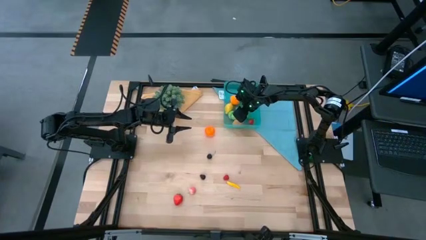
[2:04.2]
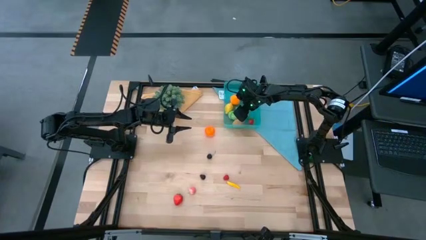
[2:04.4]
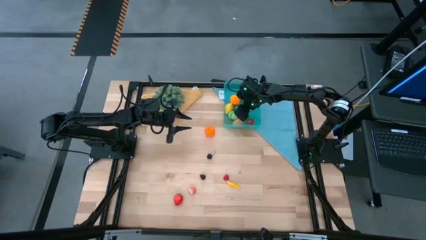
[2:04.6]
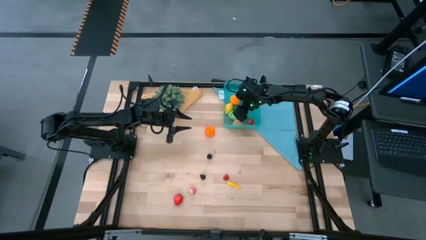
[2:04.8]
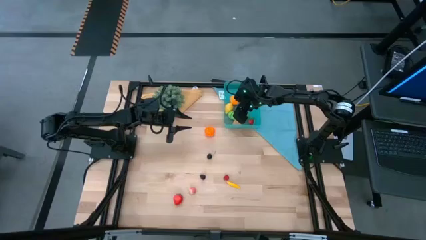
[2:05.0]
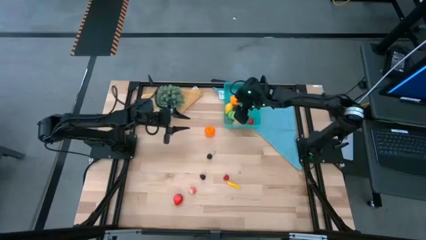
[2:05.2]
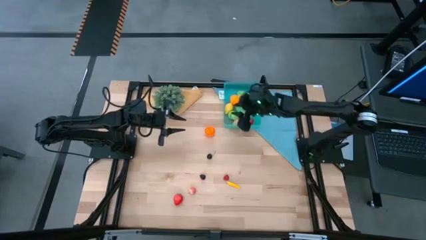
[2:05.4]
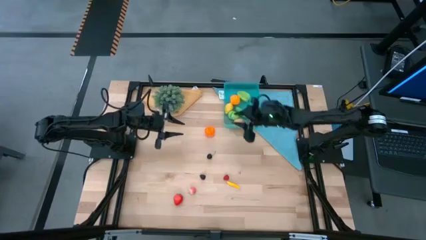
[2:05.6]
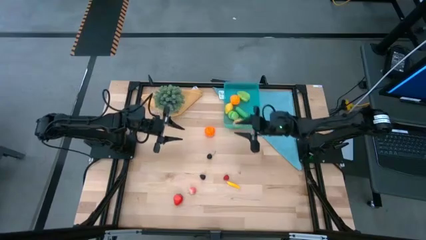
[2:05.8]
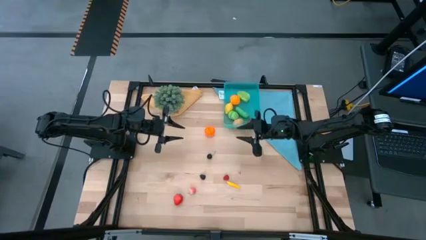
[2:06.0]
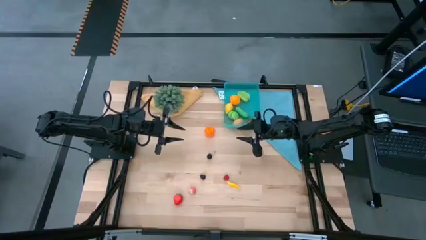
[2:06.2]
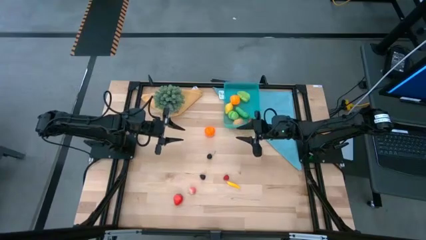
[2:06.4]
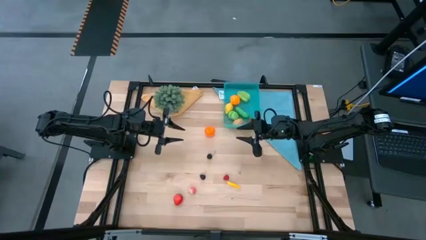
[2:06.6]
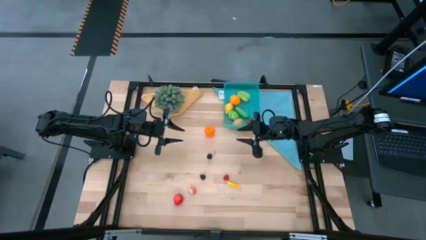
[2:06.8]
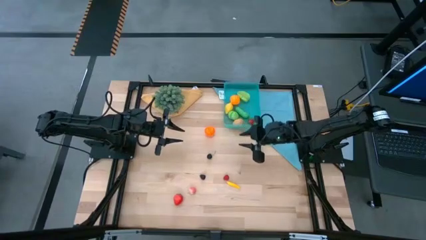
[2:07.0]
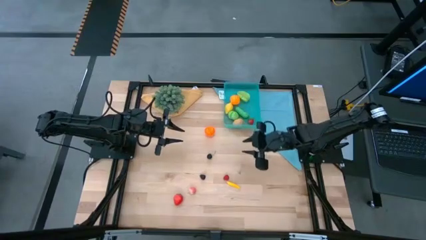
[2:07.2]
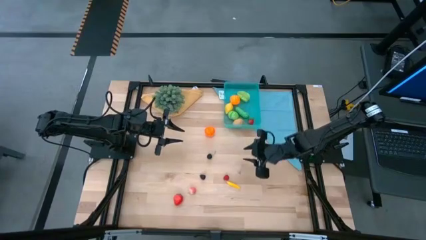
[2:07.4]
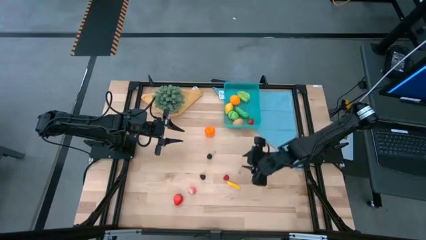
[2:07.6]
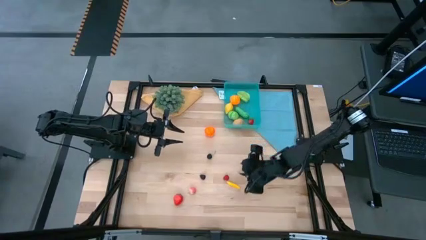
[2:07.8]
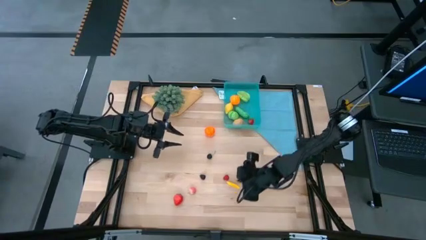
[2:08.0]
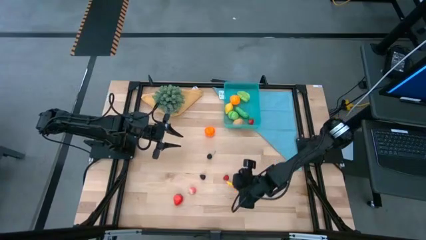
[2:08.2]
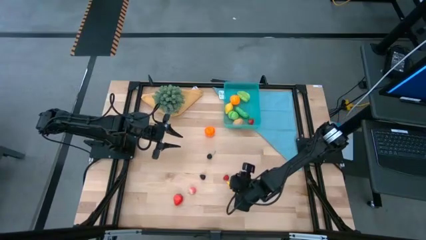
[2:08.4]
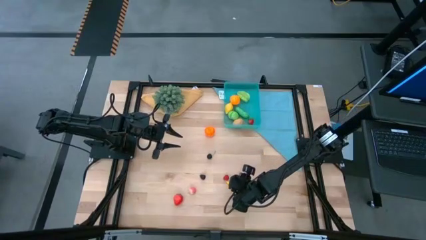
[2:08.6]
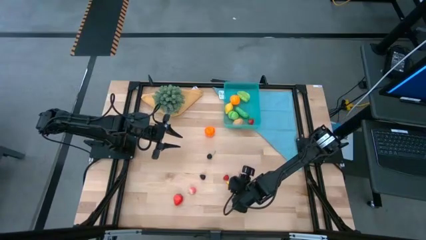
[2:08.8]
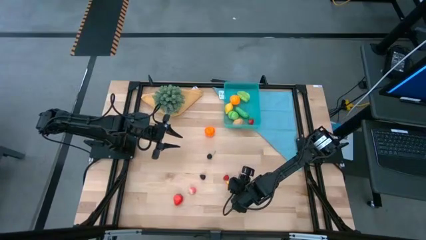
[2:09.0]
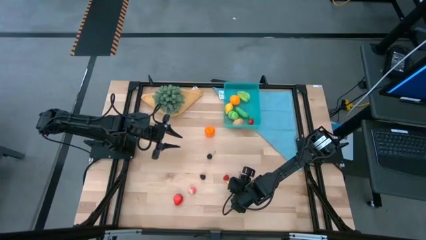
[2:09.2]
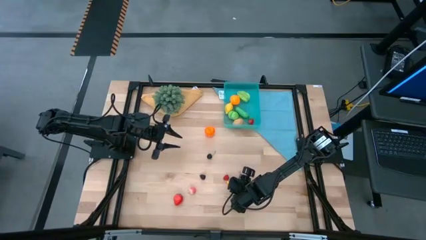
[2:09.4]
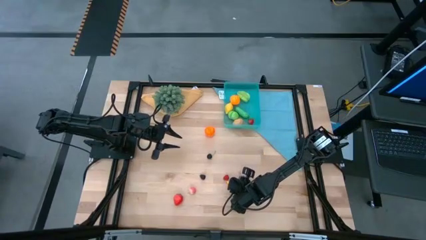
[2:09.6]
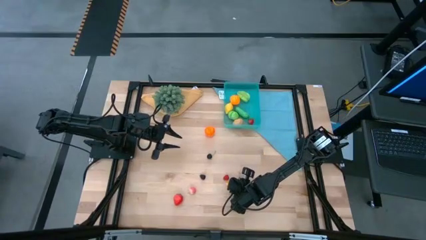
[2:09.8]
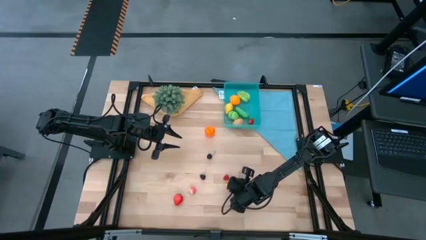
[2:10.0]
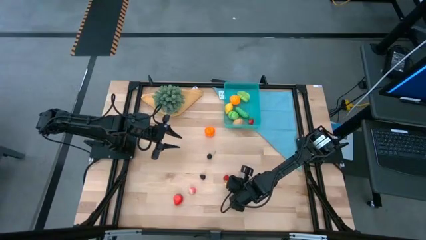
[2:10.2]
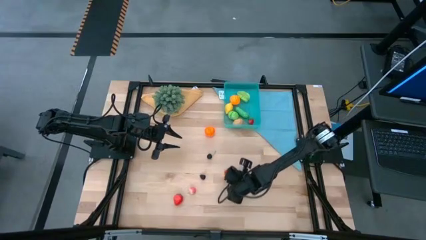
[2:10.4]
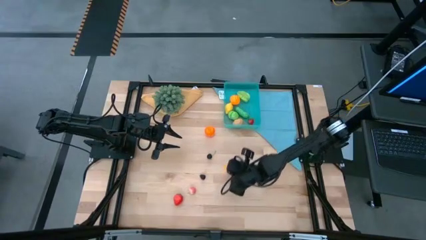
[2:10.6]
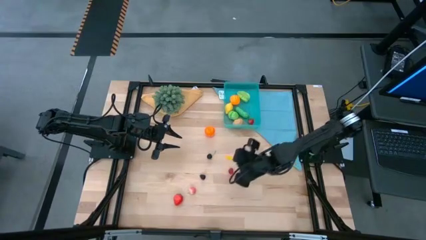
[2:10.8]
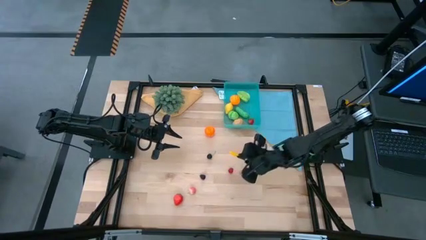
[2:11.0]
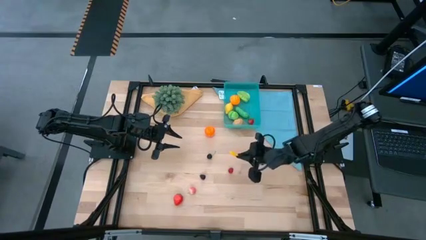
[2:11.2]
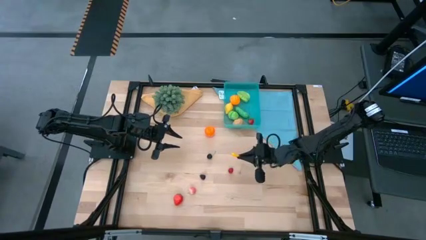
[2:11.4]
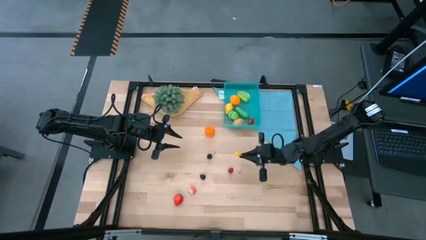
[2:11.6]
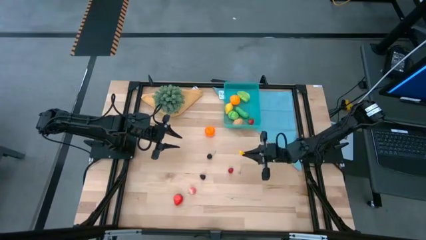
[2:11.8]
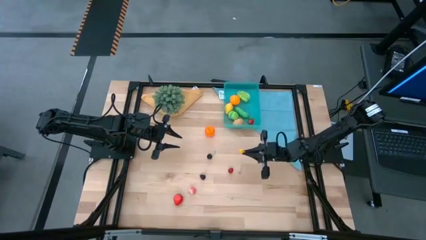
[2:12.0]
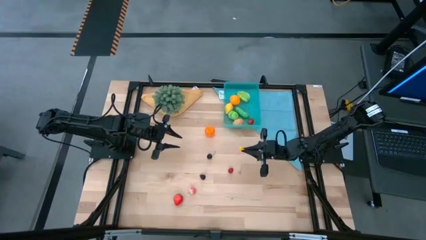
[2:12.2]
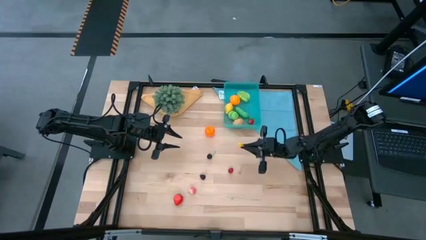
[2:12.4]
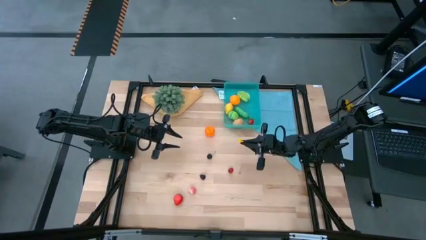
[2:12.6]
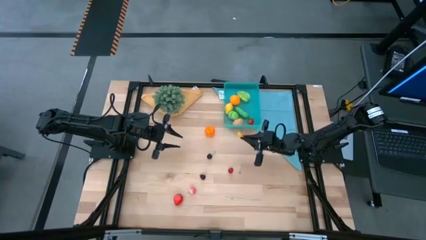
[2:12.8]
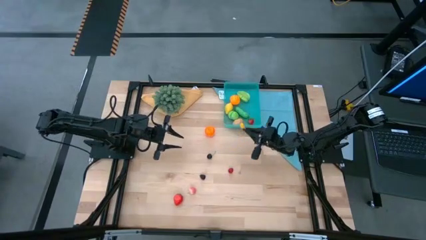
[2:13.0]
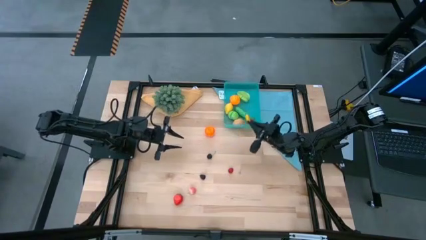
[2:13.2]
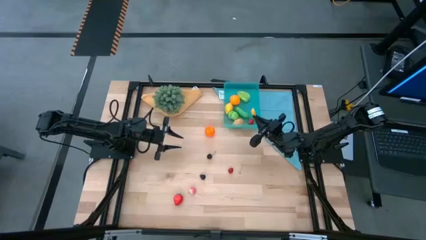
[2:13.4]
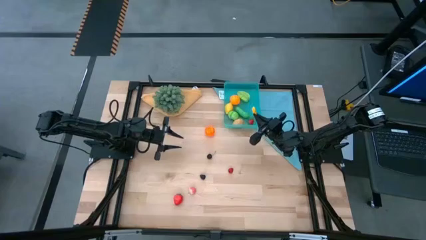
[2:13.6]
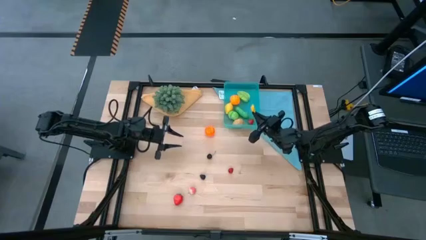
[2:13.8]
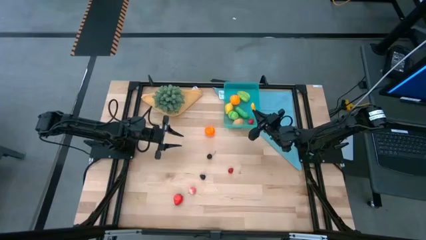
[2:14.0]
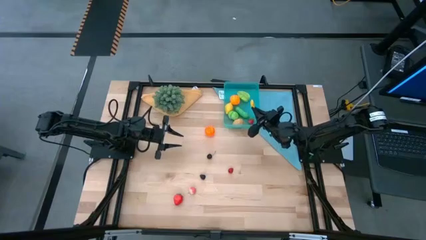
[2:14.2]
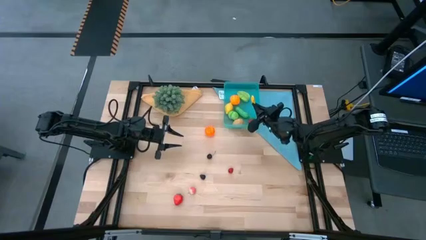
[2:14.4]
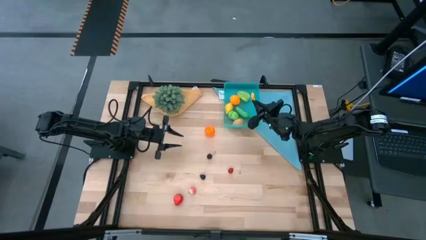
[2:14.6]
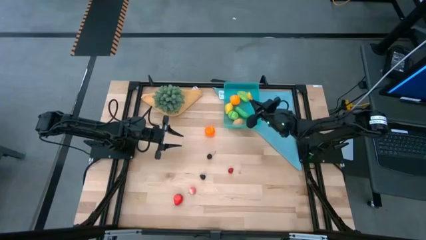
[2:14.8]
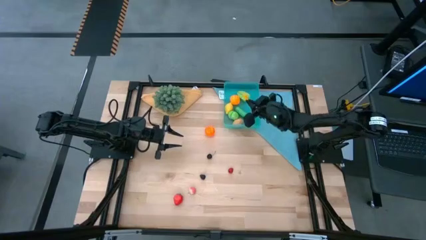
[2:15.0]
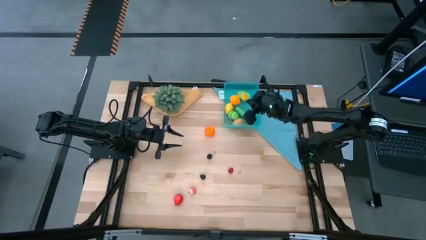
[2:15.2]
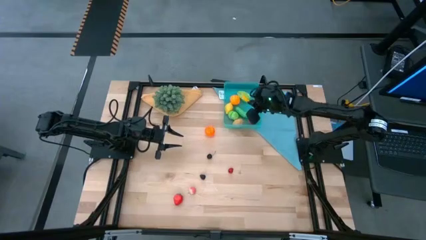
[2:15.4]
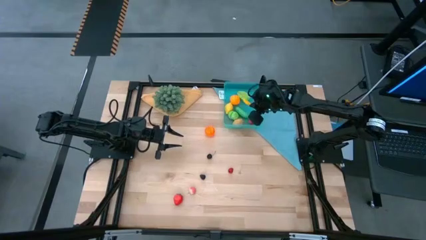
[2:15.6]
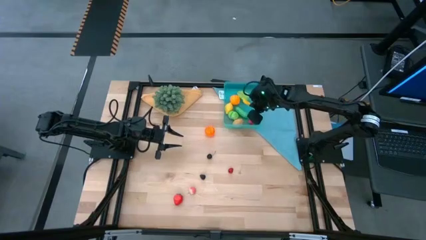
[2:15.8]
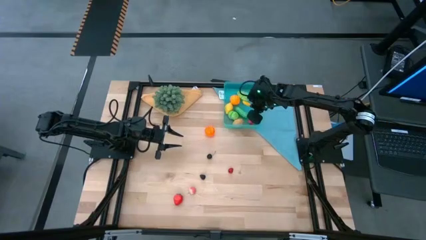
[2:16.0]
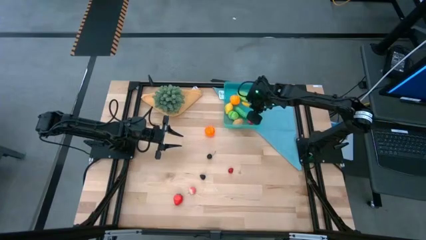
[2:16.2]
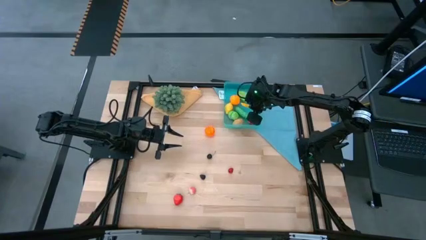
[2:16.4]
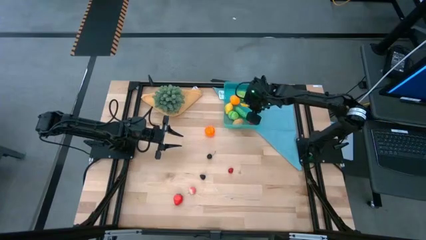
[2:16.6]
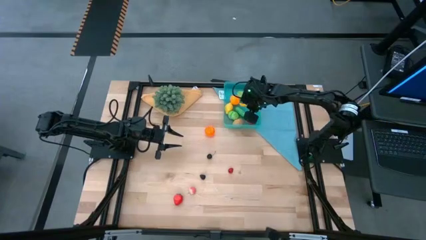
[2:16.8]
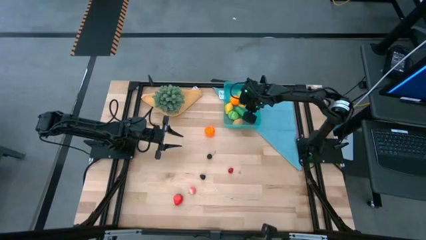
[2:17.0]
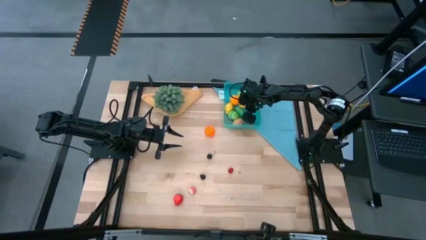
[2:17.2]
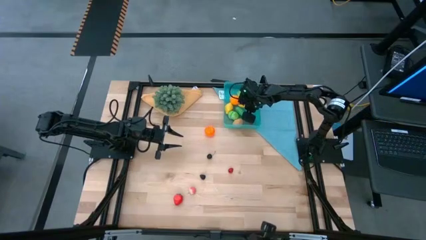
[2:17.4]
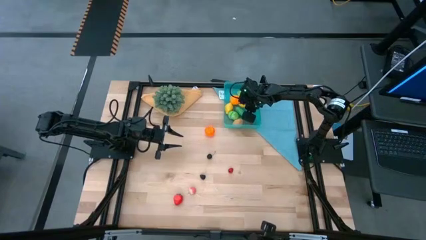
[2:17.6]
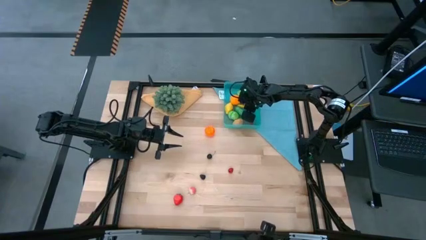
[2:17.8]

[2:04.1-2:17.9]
Task: Pick and placing Produce into tupperware
Put the yellow corn into the blue bin

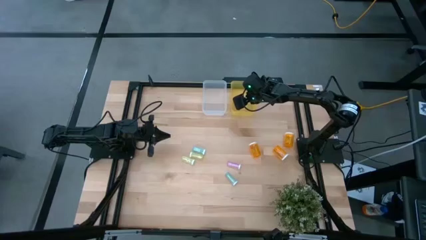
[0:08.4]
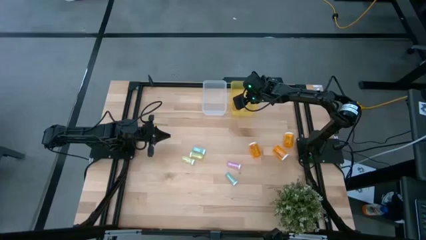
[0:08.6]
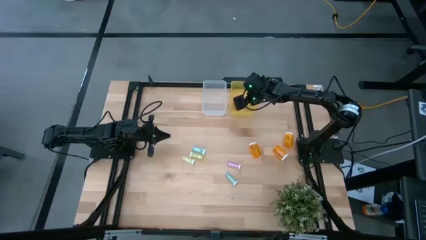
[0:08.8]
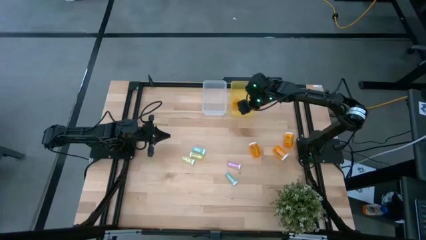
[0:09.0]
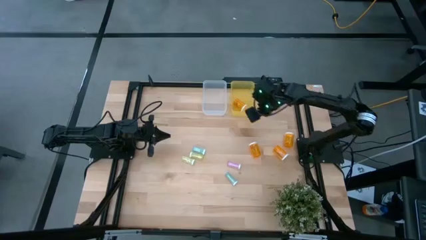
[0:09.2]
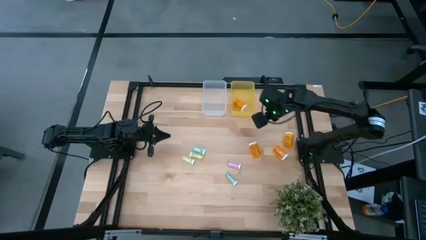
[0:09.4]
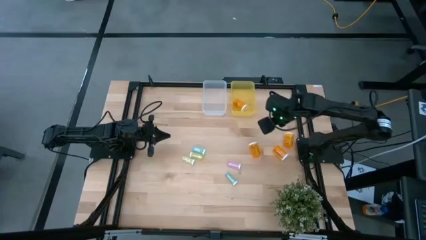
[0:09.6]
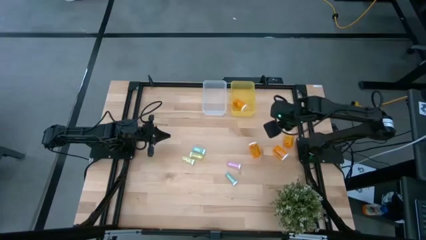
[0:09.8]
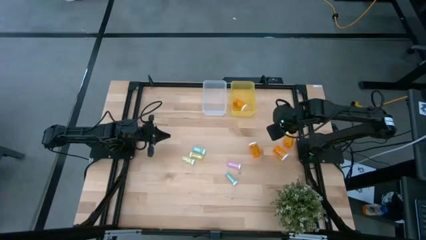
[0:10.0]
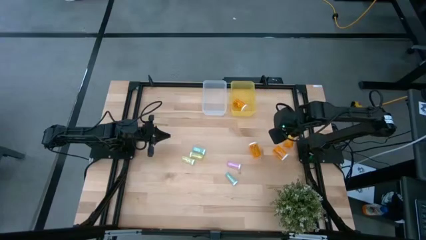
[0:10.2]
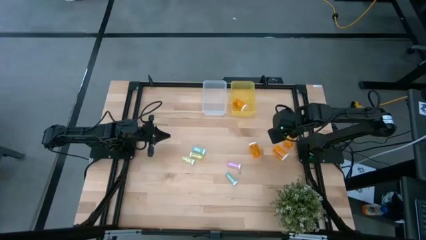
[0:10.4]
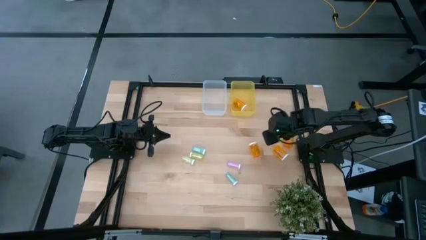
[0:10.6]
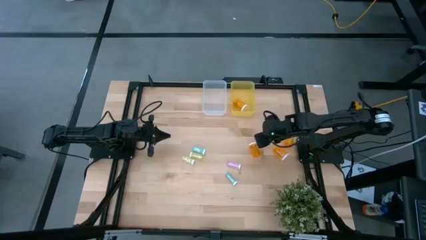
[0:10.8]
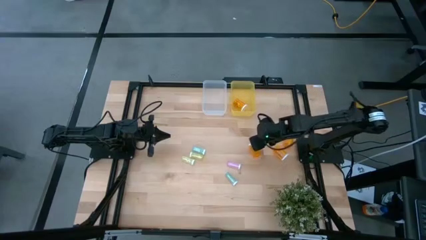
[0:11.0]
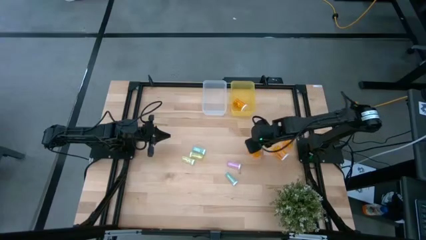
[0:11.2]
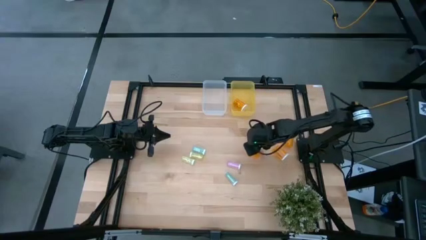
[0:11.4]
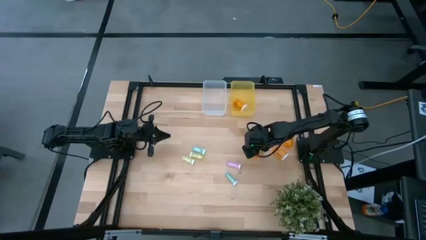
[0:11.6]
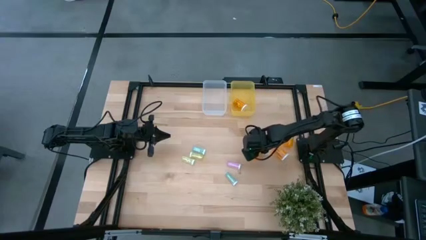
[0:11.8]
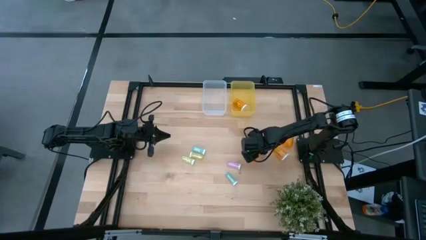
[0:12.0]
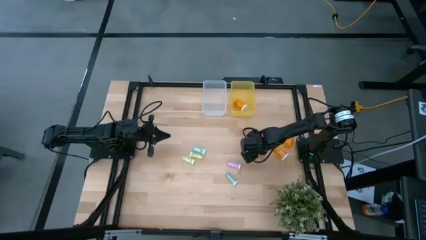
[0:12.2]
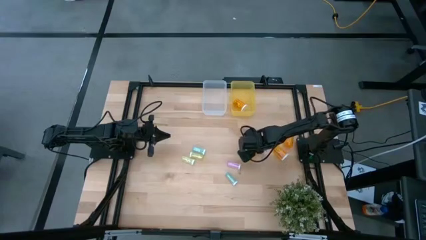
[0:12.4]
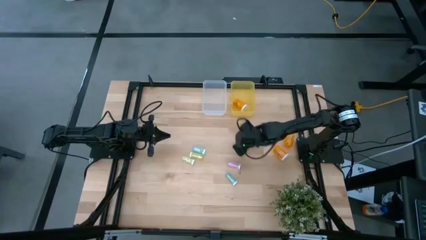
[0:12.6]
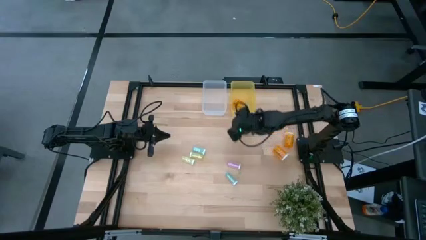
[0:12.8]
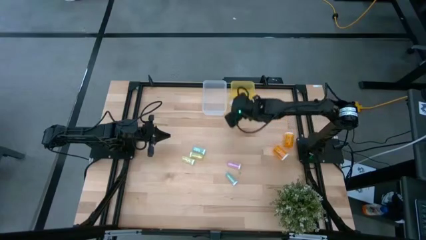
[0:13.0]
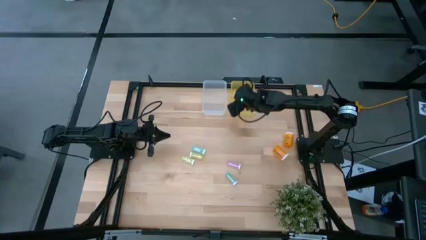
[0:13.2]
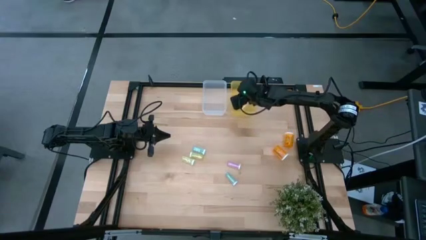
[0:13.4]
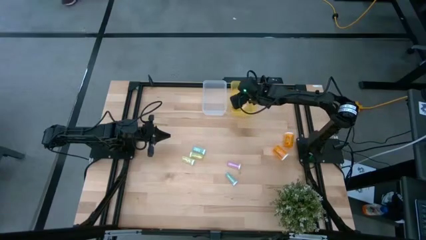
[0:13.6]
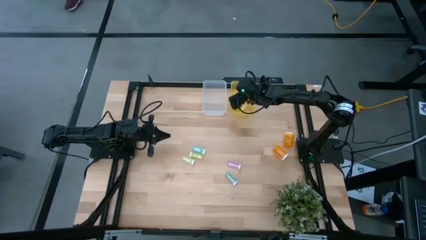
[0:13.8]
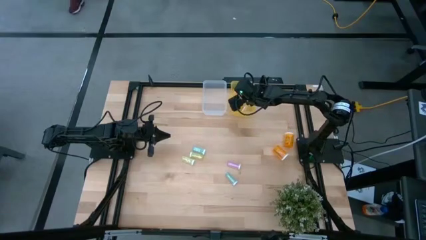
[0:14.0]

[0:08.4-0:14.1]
Task: Pick and place medicine bottles into bin by pill shape (circle, oval)
Put the large orange pill bottle into the yellow bin
